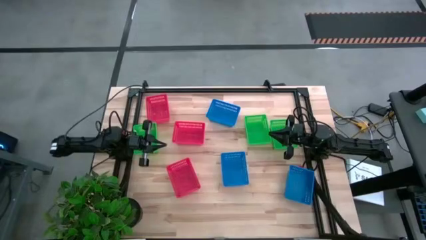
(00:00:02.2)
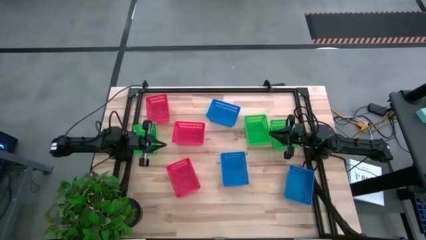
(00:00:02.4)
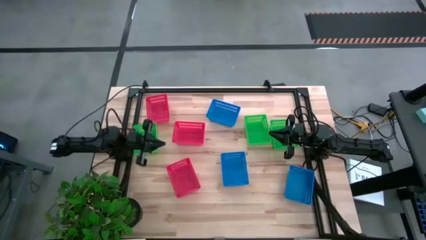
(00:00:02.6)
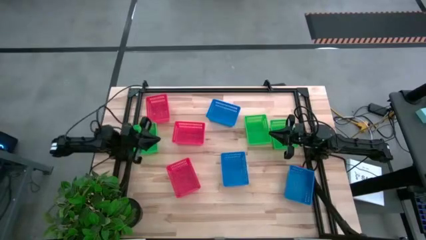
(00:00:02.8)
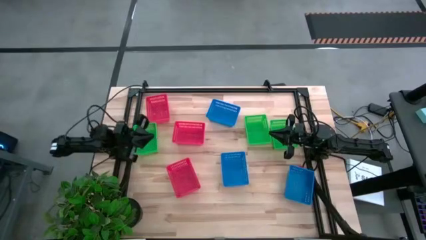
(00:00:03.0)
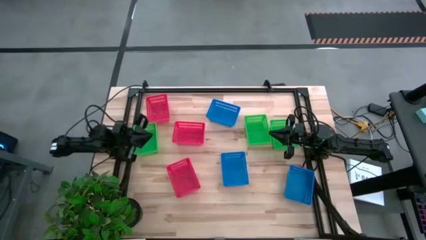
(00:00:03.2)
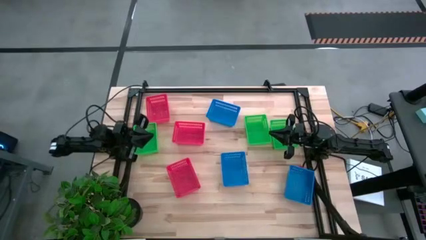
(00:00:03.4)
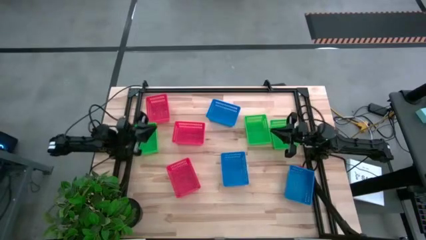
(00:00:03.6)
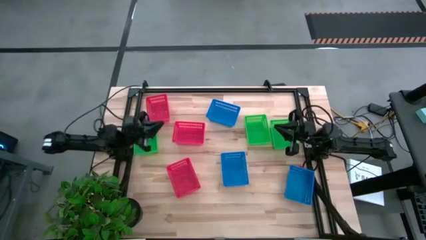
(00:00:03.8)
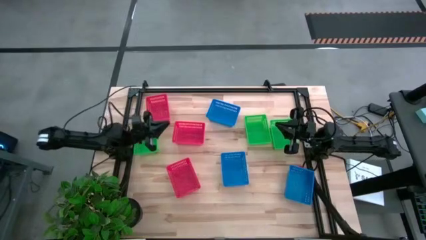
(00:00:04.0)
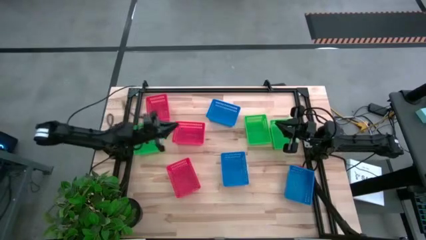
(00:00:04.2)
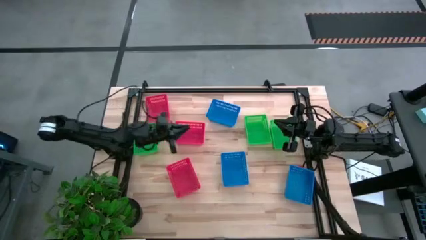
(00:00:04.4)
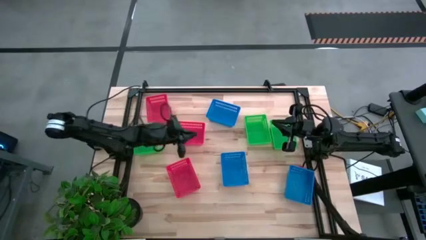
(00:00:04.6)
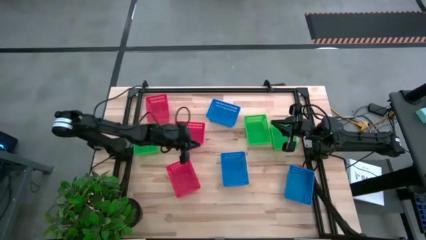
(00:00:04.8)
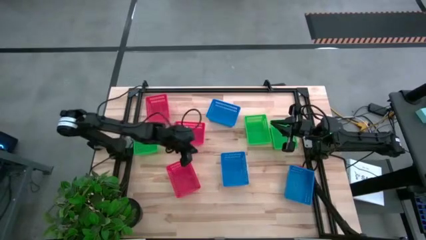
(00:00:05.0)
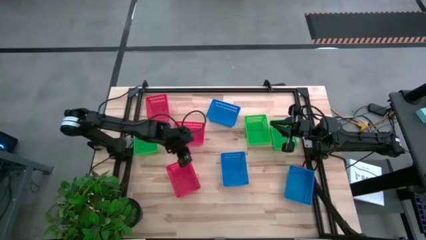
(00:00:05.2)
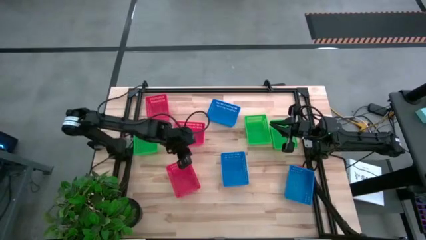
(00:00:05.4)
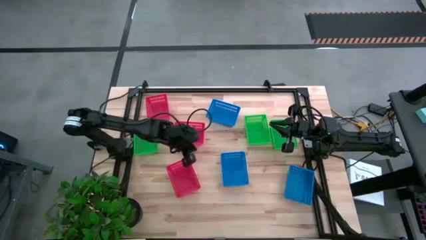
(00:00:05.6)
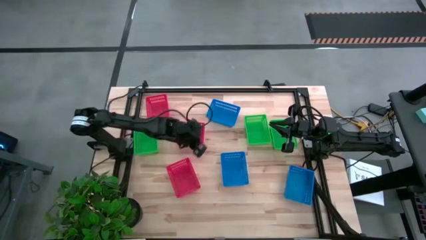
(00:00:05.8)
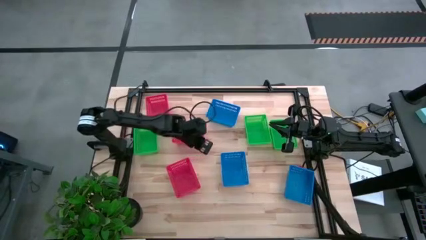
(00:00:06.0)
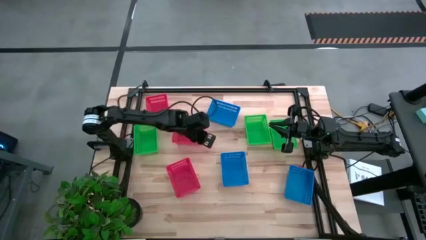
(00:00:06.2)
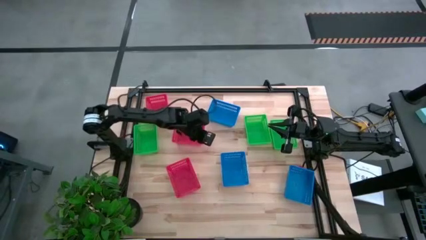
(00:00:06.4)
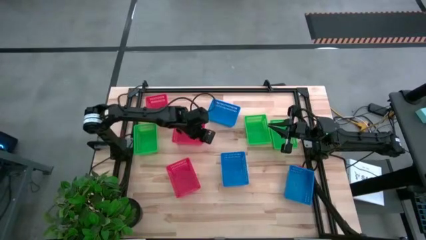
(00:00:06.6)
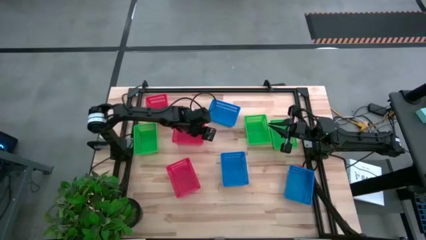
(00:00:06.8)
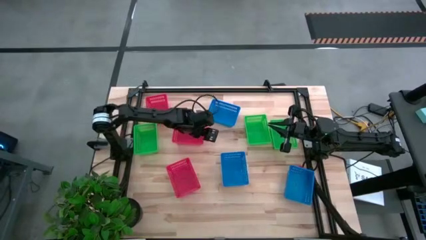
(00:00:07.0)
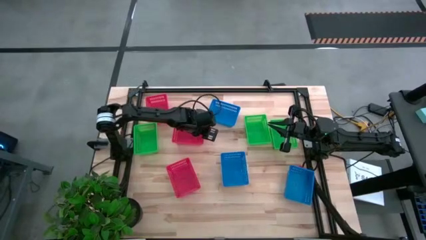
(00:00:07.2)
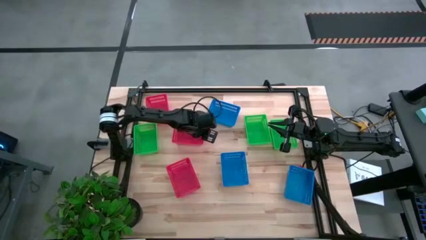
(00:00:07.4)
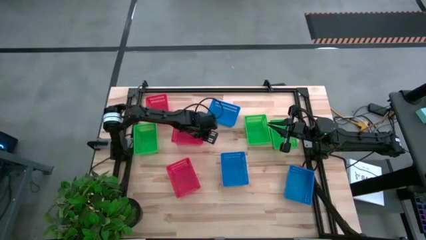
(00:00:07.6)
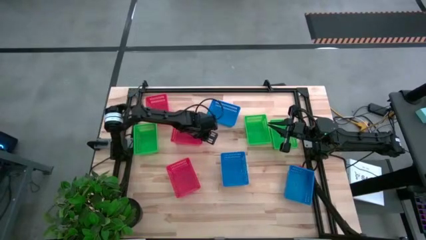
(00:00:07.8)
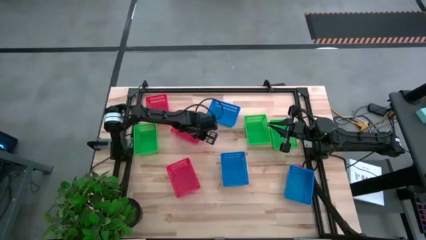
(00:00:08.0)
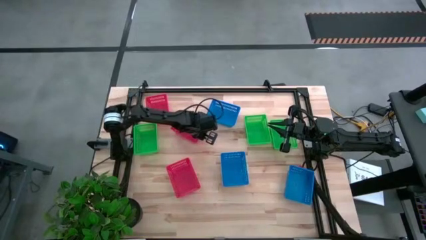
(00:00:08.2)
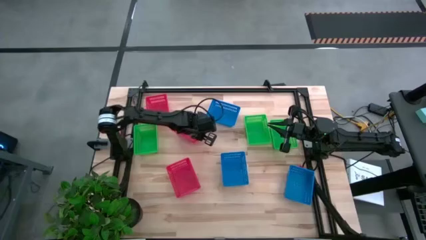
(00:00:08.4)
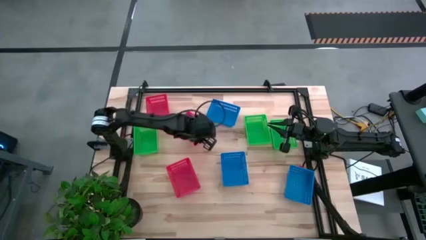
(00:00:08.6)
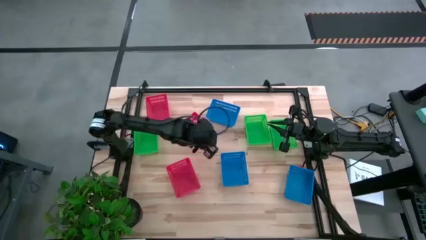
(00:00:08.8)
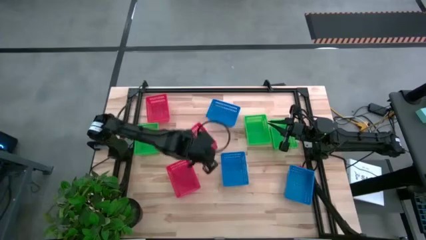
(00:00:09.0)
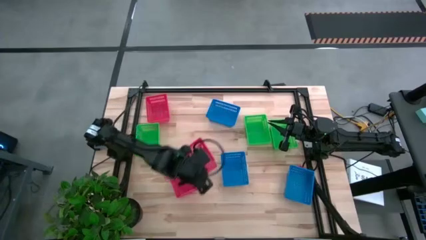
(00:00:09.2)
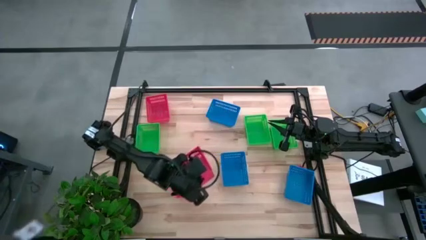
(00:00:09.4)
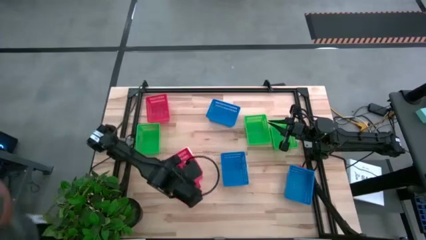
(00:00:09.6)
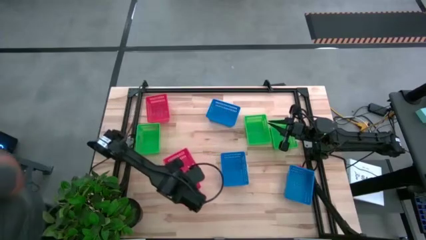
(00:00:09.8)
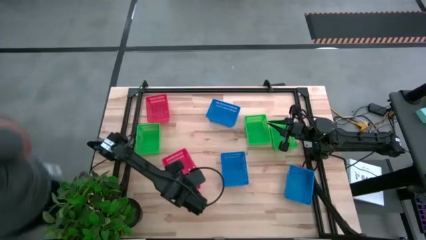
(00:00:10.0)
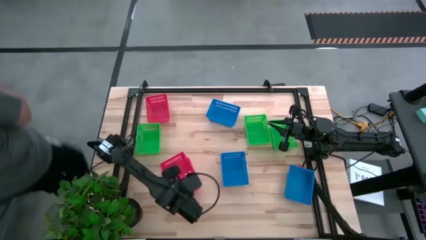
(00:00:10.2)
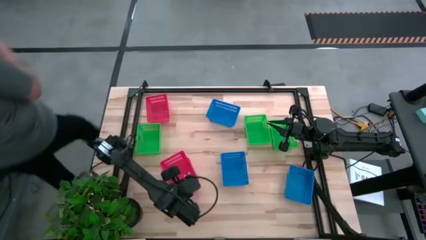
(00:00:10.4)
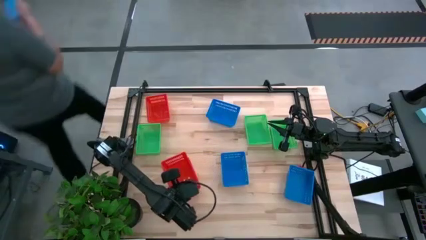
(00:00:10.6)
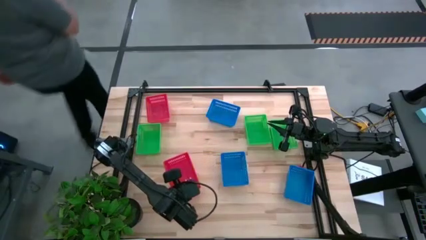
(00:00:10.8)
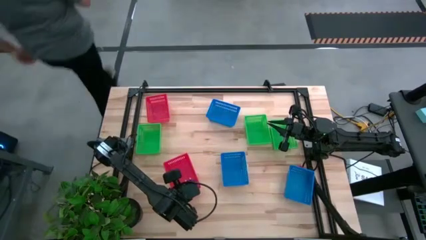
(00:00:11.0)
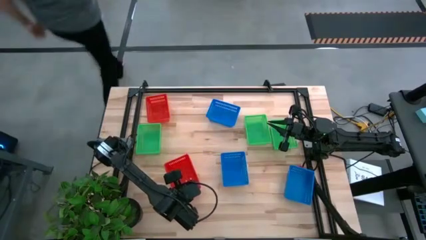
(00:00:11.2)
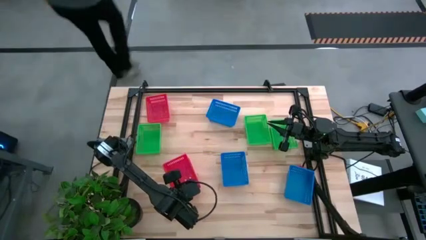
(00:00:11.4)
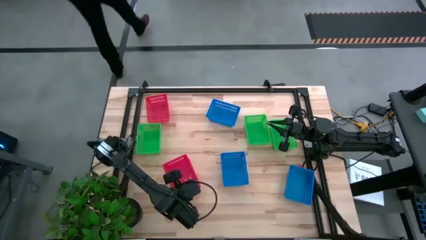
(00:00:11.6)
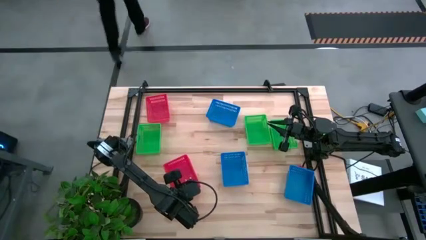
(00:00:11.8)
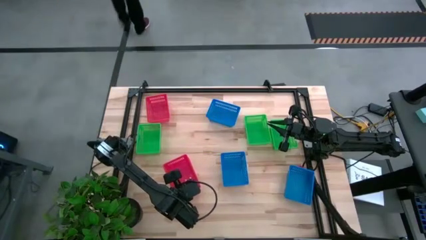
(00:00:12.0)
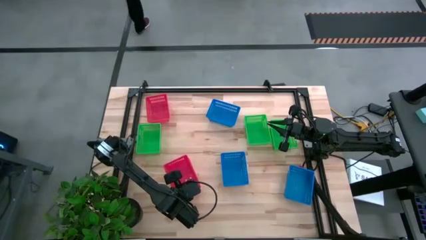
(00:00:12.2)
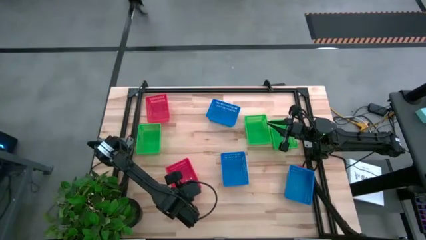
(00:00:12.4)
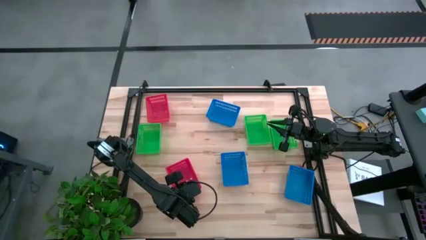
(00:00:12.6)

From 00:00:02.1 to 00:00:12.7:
Stack the middle red bin on top of the bottom red bin

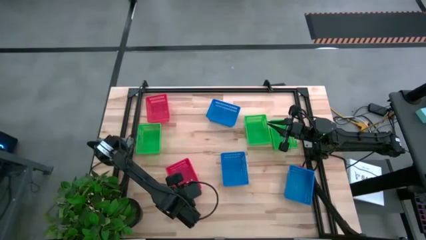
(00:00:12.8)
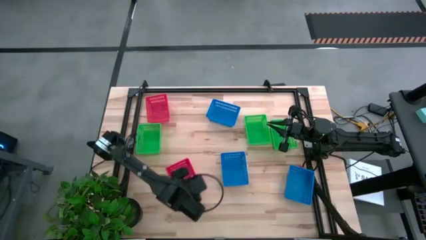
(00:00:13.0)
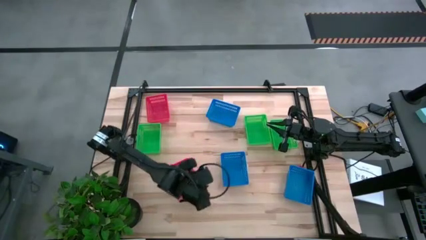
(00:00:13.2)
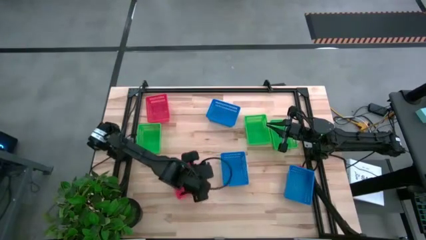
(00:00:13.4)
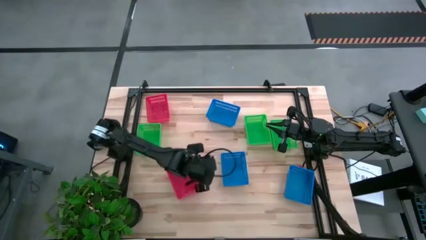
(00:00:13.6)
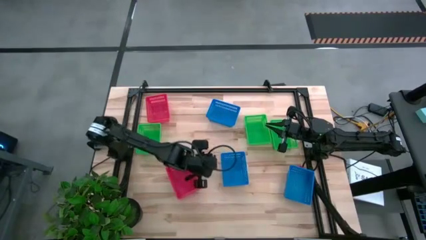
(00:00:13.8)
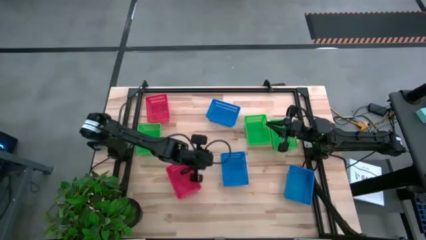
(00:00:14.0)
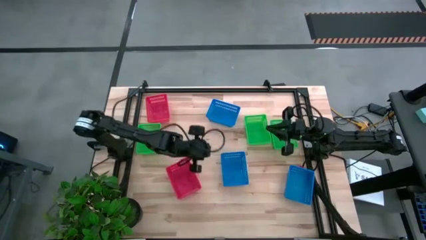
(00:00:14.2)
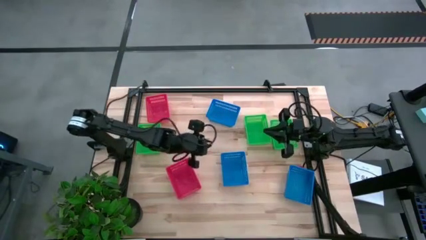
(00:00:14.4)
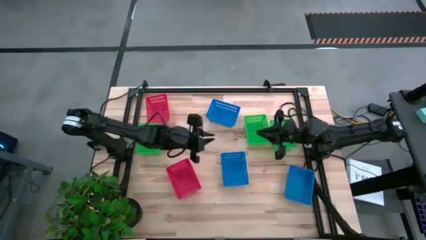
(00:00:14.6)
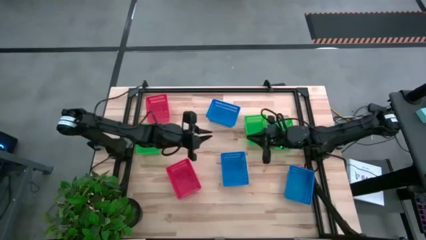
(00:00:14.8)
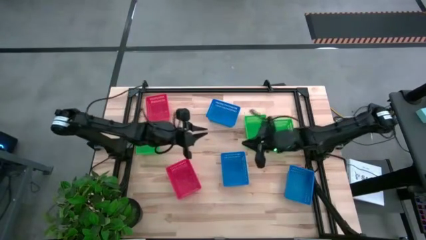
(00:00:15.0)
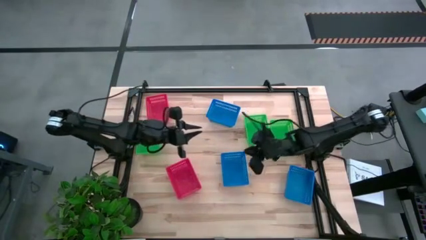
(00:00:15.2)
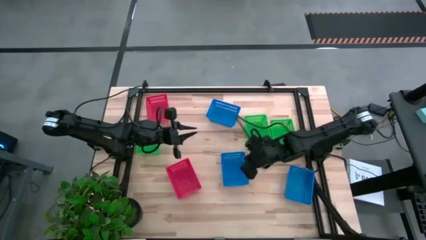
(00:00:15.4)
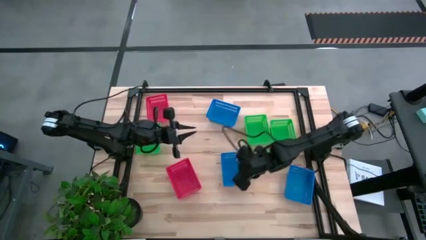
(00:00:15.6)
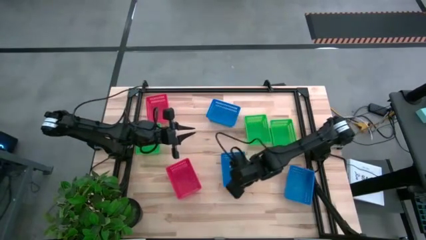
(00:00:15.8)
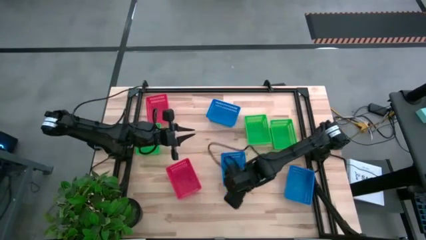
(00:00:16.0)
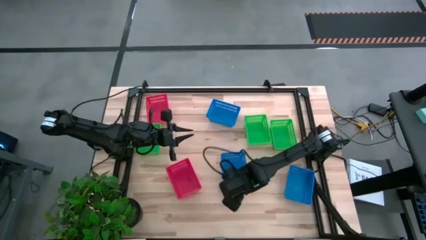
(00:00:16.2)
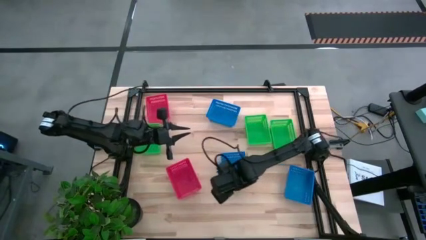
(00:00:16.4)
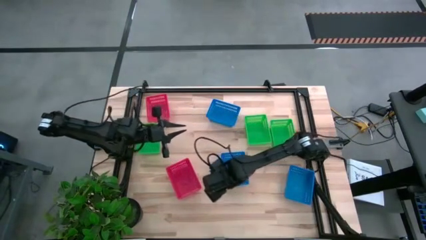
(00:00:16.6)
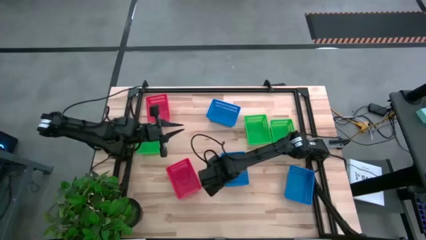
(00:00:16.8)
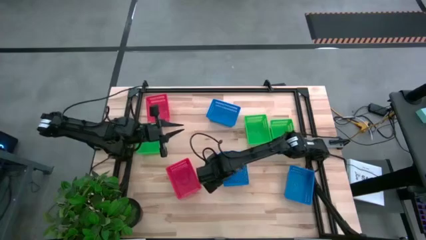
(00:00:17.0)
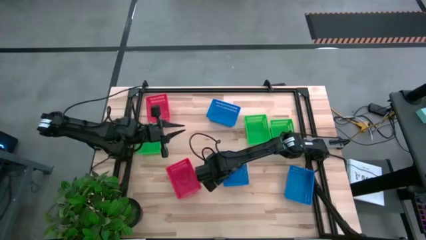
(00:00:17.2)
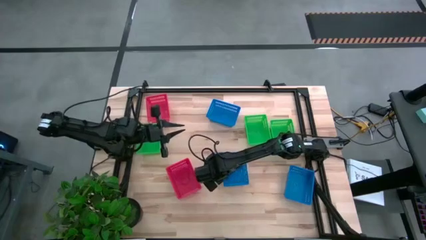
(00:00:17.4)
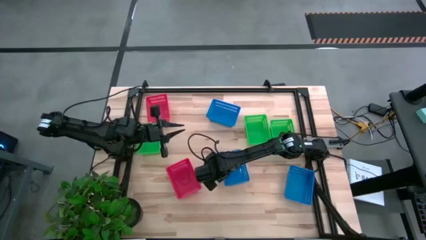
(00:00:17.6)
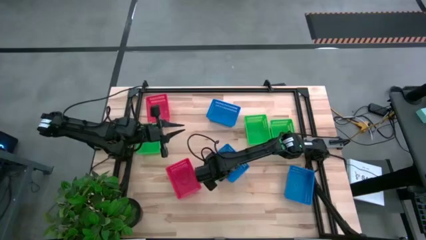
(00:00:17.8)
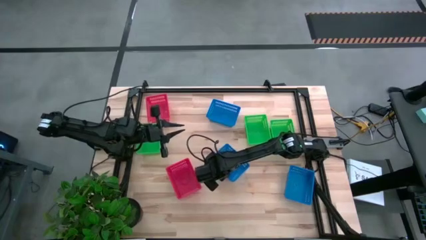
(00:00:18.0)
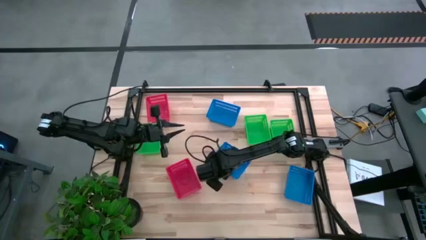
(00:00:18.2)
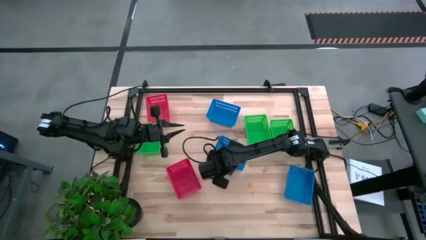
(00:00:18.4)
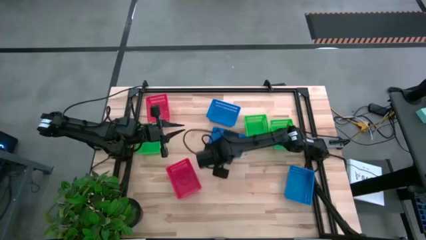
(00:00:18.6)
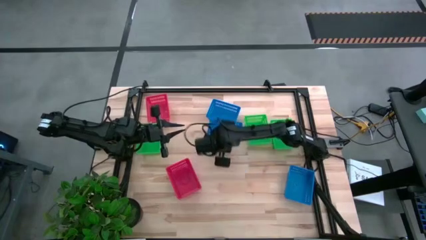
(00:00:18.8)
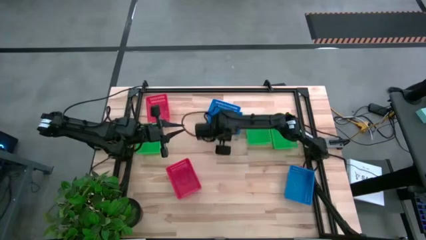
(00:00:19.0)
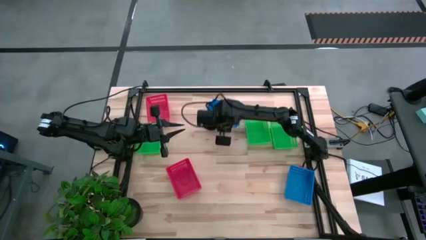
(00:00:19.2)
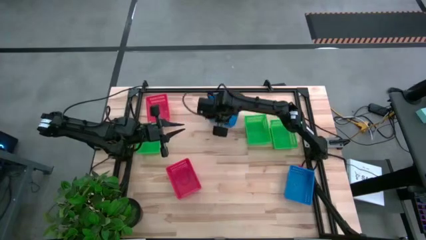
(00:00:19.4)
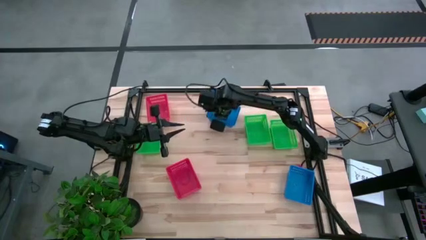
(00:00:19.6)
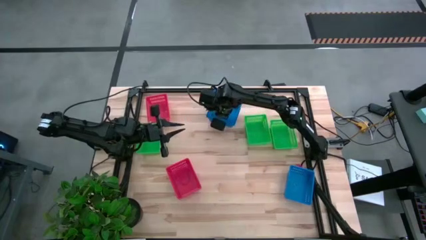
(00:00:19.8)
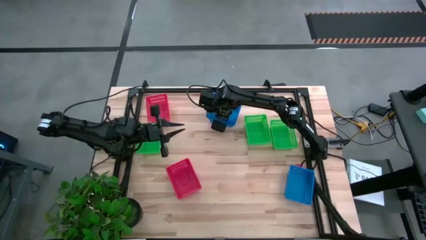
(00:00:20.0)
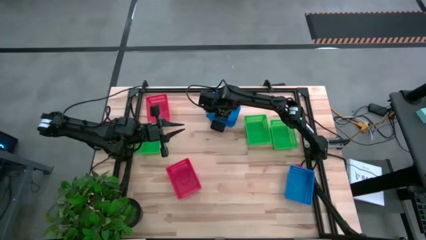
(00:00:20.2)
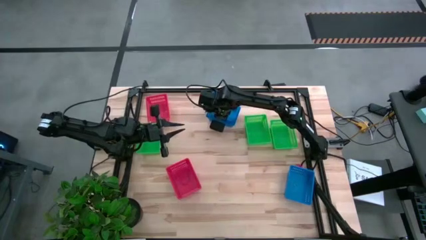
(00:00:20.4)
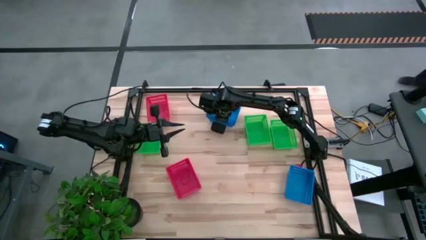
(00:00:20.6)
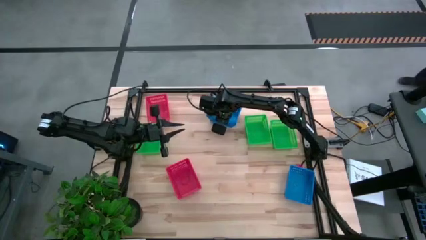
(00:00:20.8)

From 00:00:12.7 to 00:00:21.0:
Stack the bottom left blue bin on top of the top blue bin
